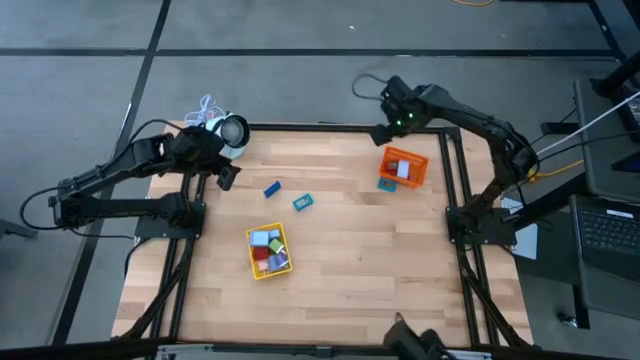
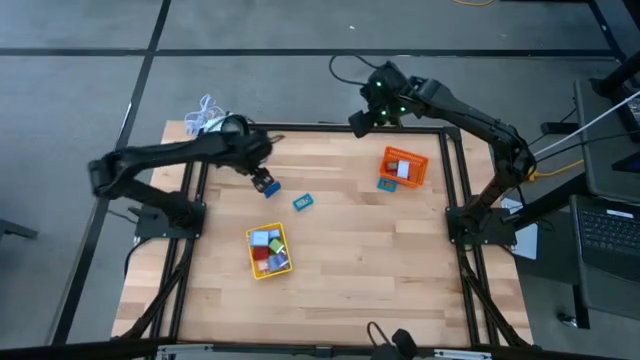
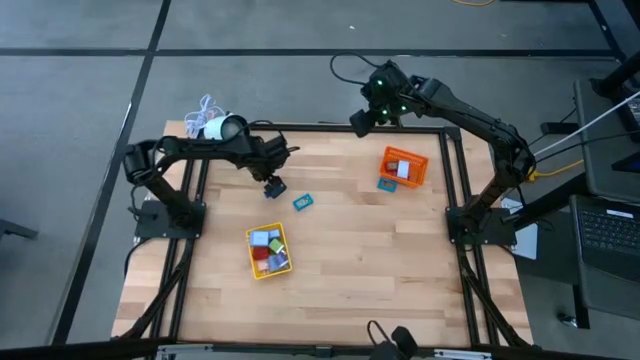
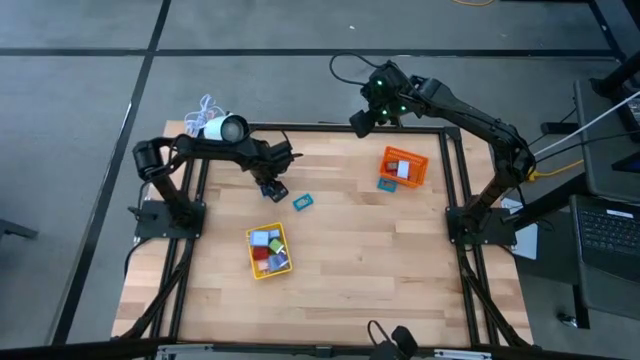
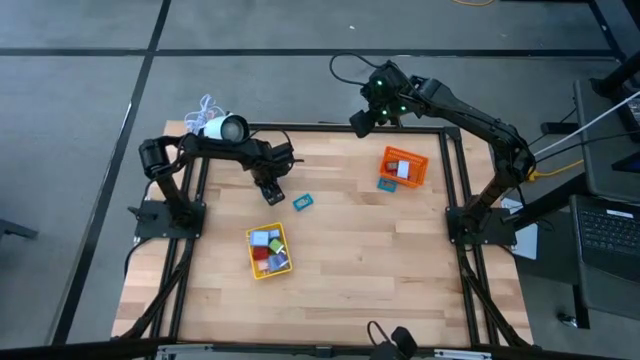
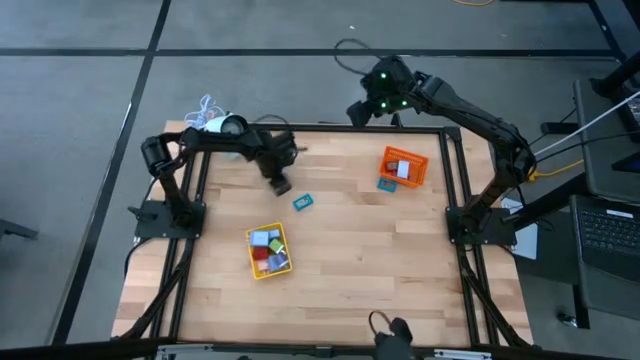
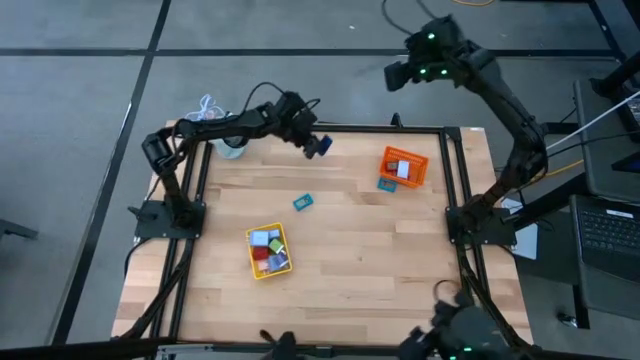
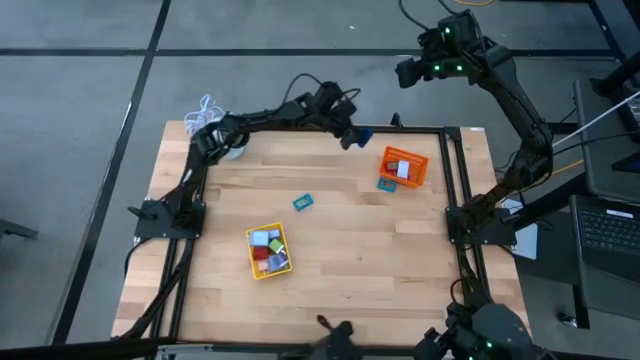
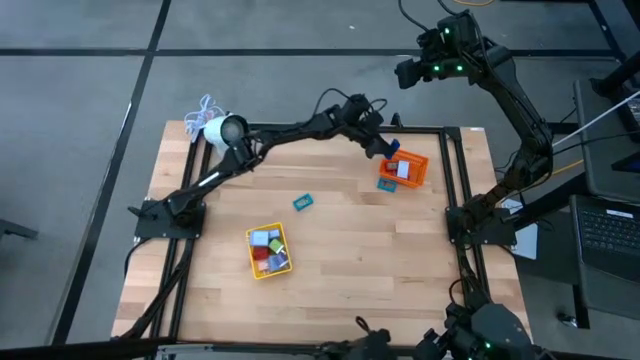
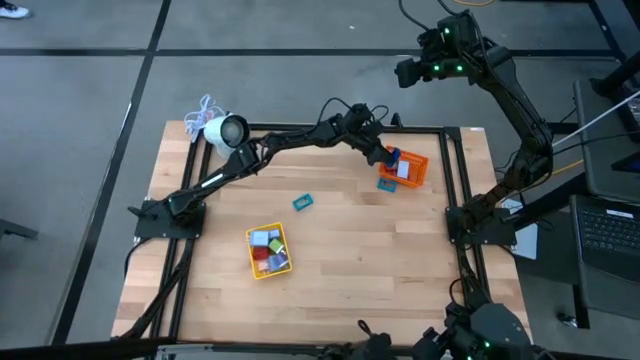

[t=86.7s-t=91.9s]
Task: Pick & Place Office items
Put the blue digital timer into the orange bin

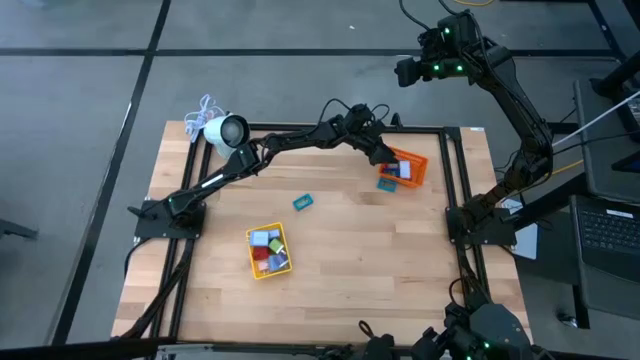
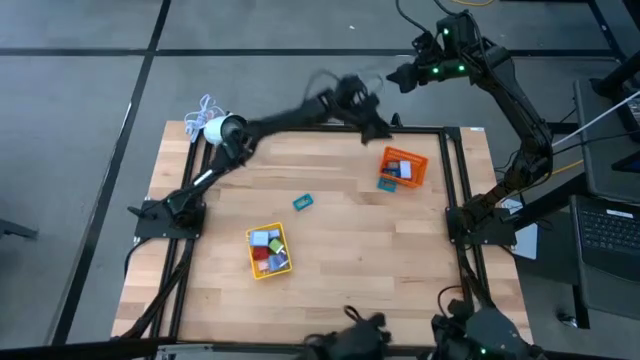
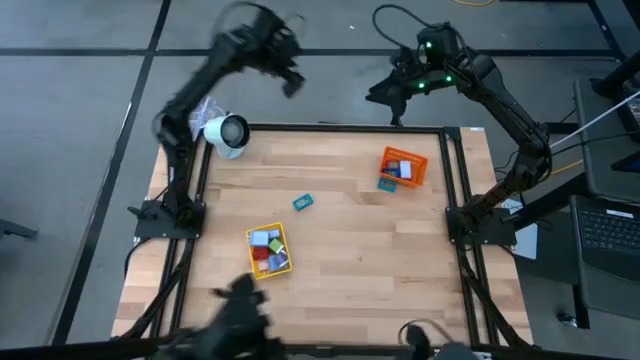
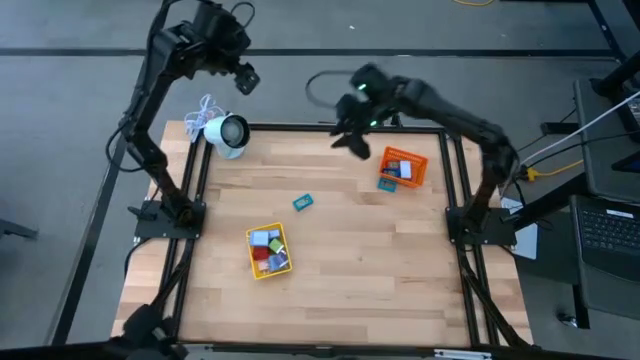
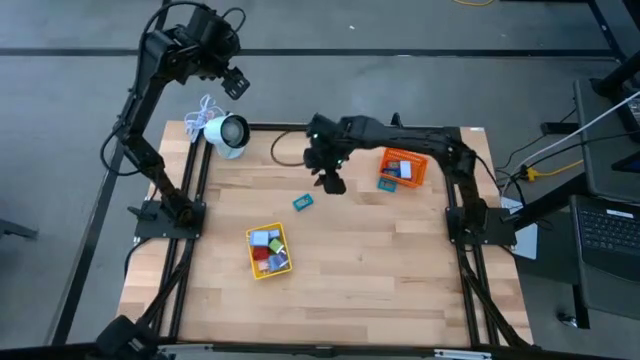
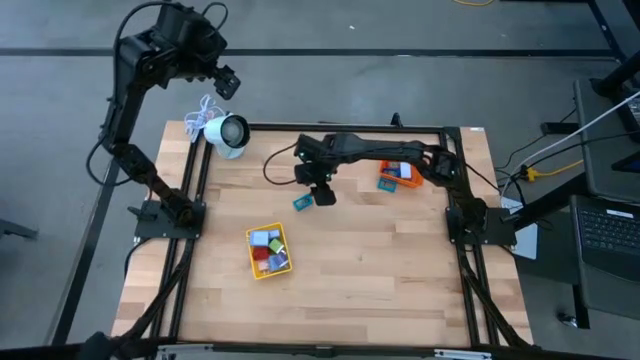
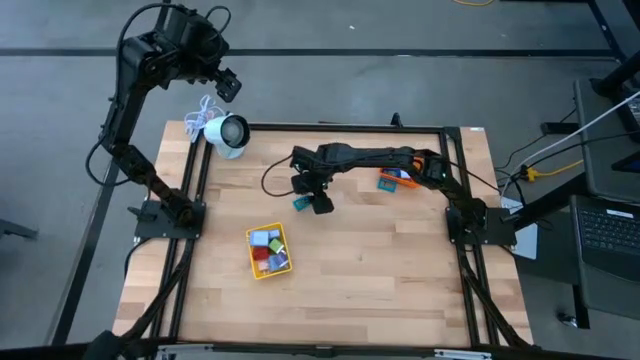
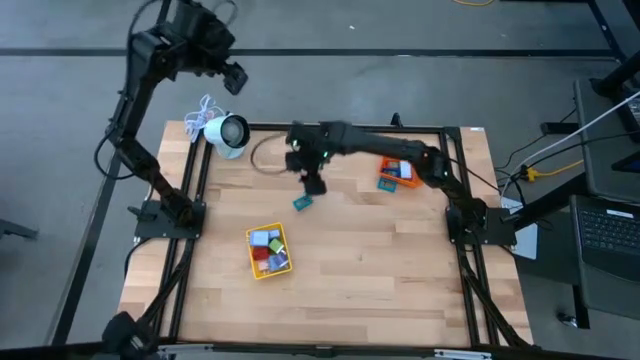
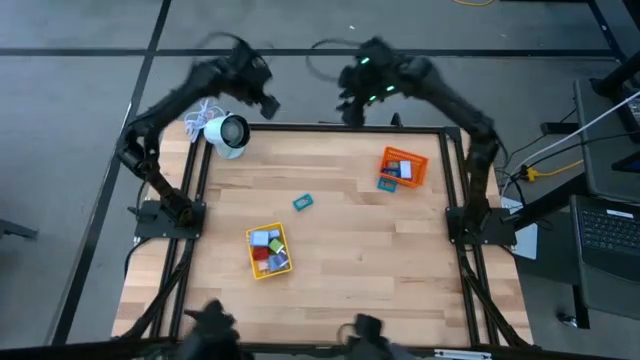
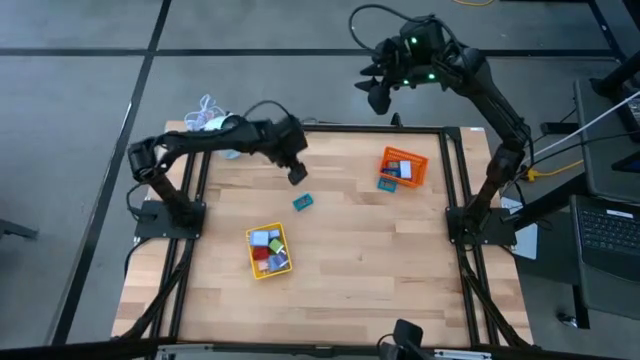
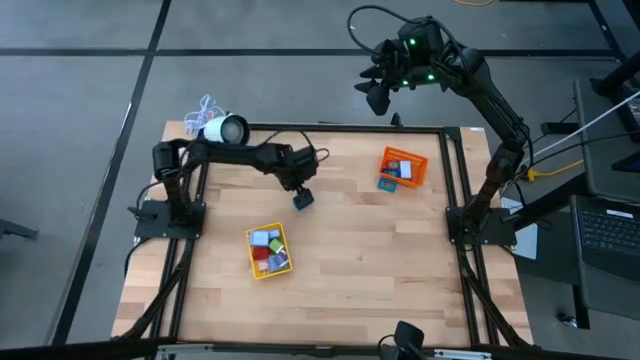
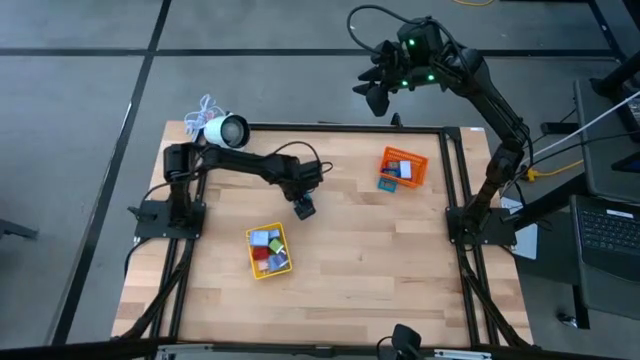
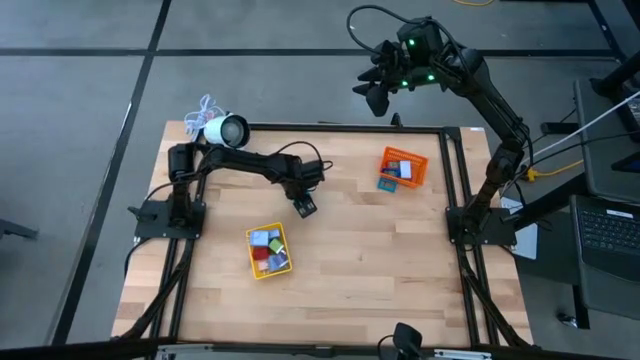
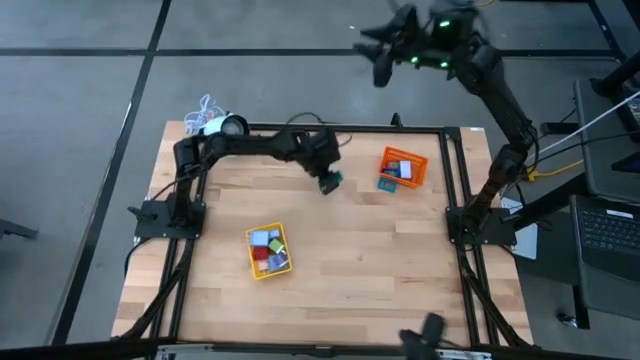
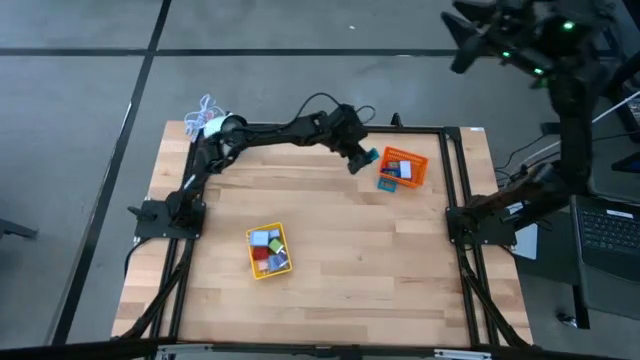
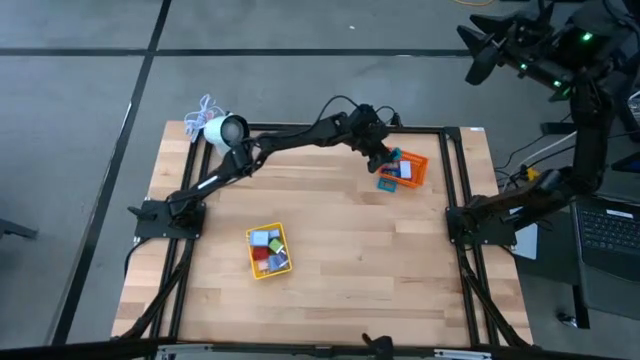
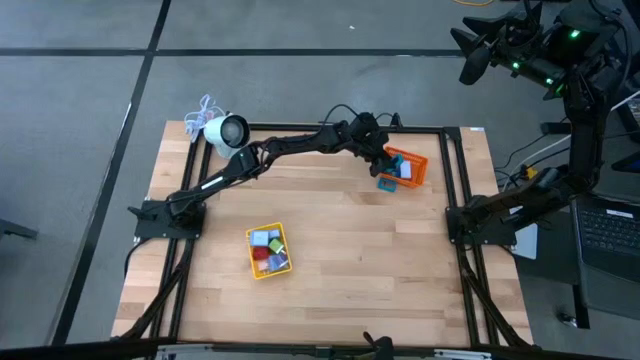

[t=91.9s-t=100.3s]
Put the bottom light blue digital timer into the orange bin

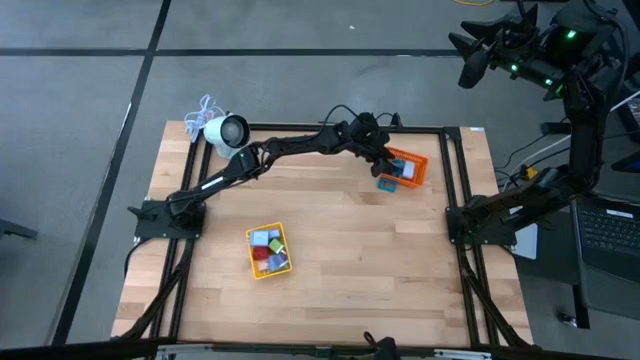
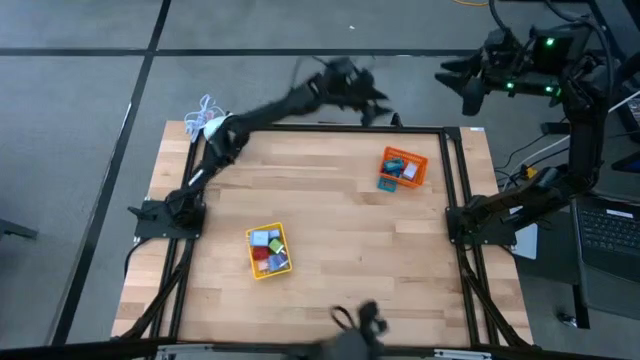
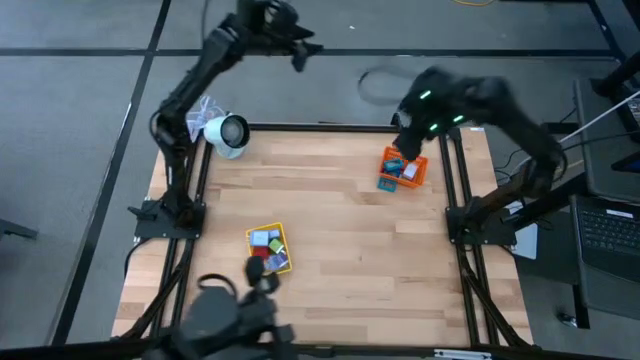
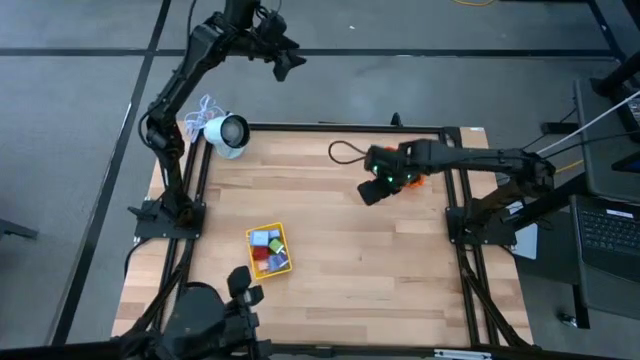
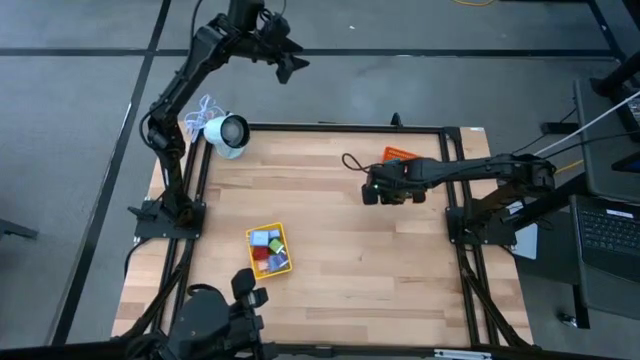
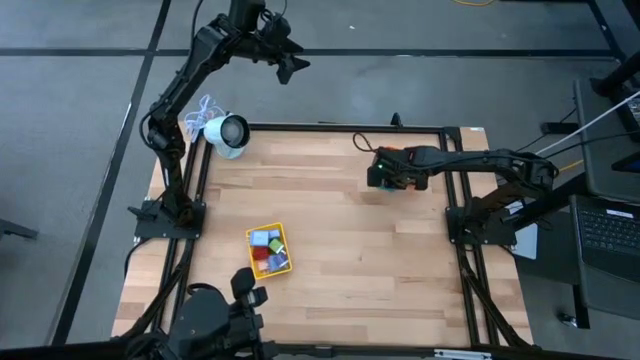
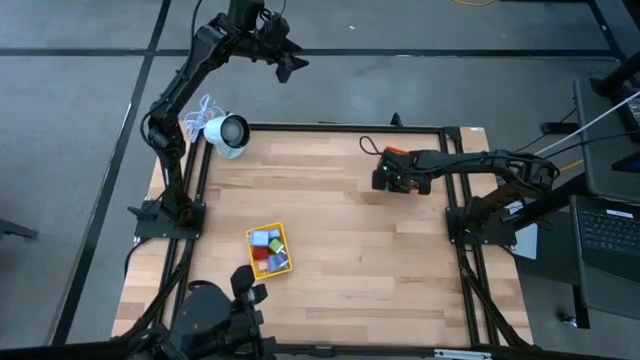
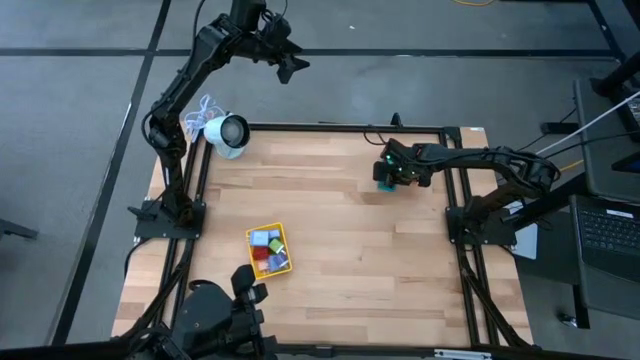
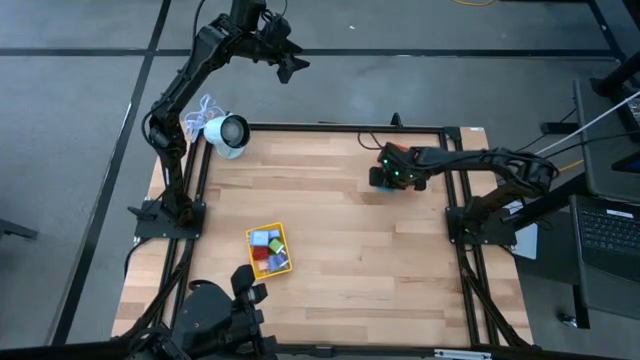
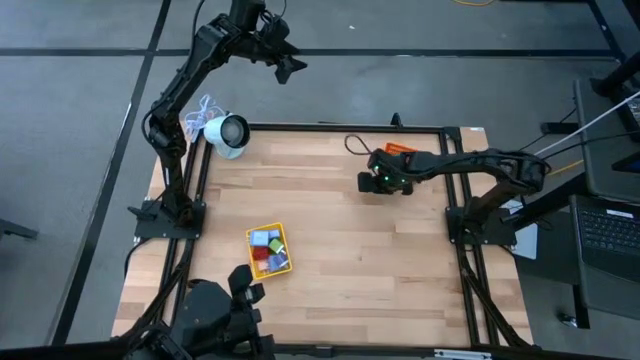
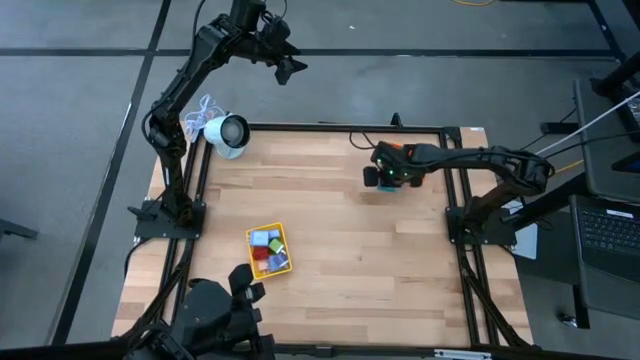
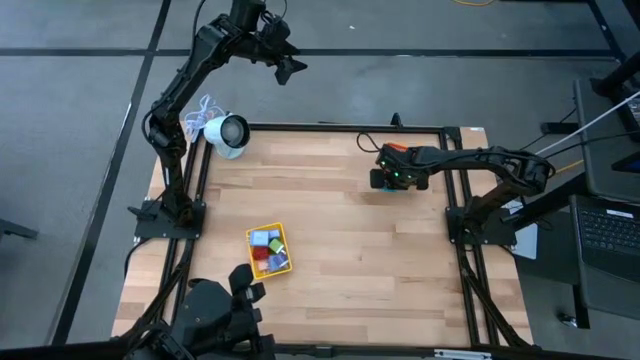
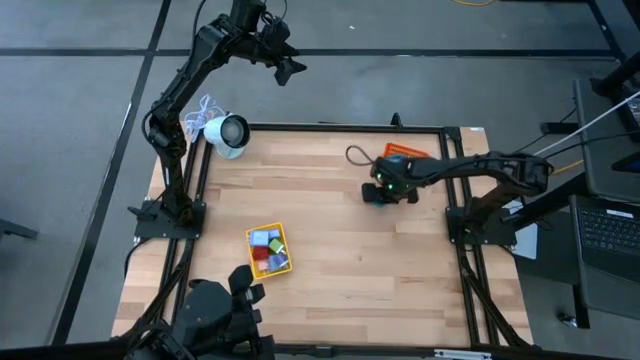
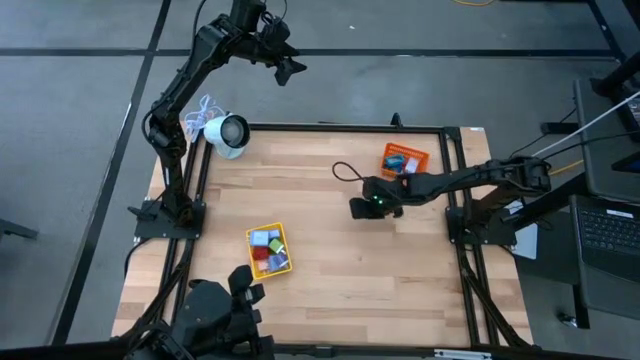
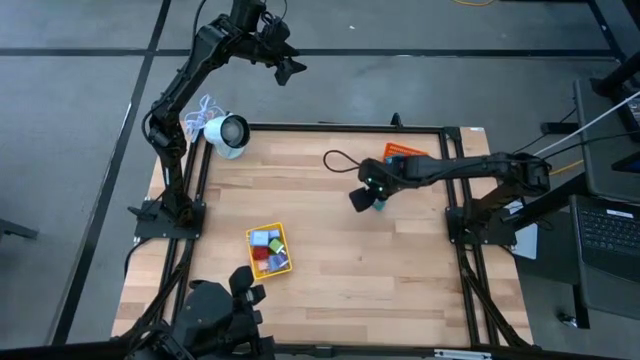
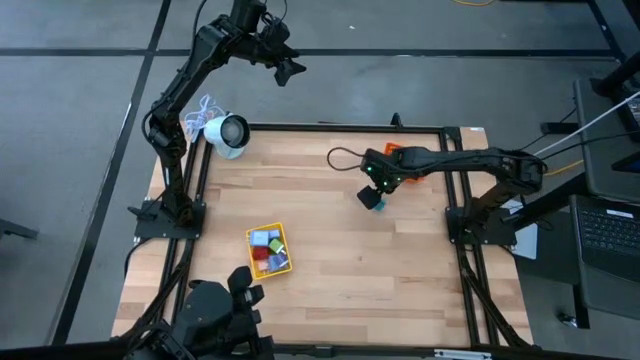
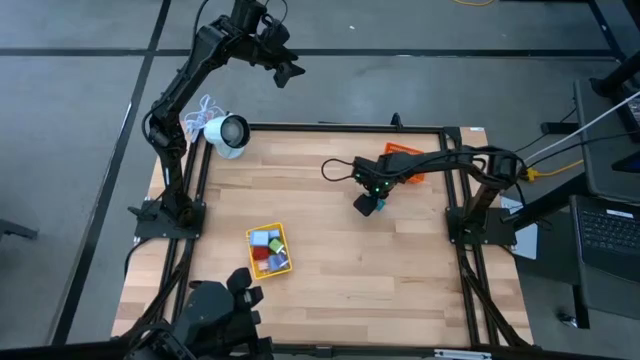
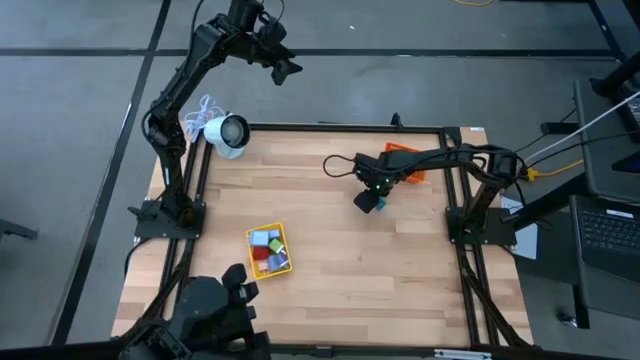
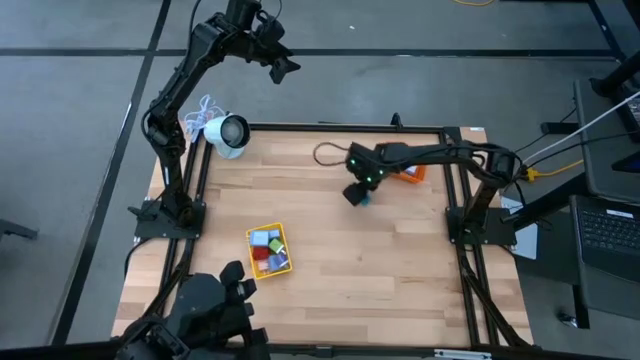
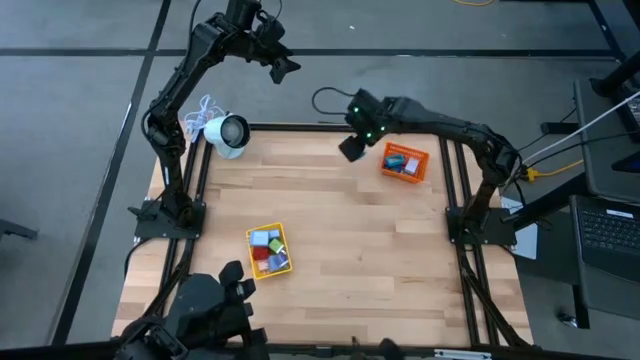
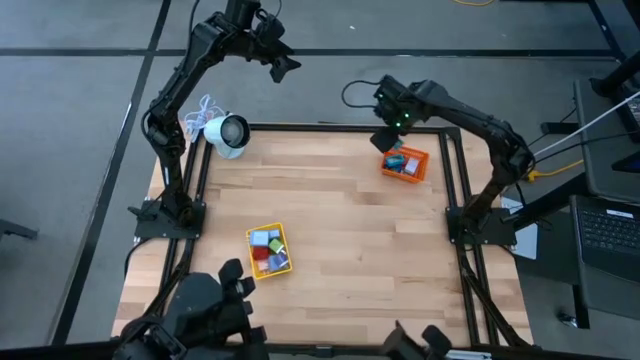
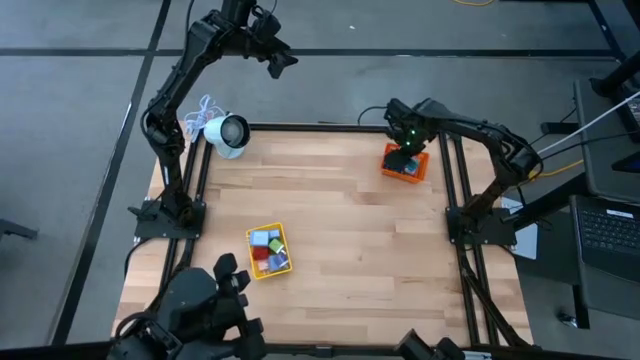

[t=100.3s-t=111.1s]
Put the light blue digital timer into the orange bin
